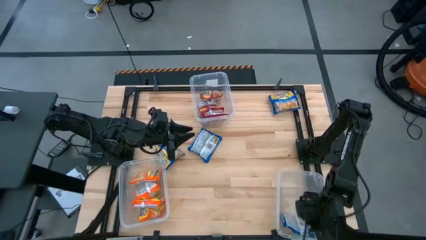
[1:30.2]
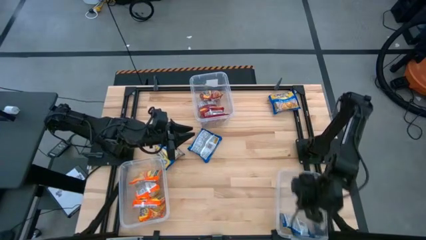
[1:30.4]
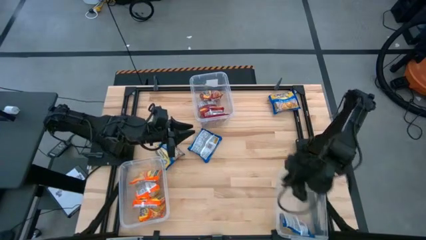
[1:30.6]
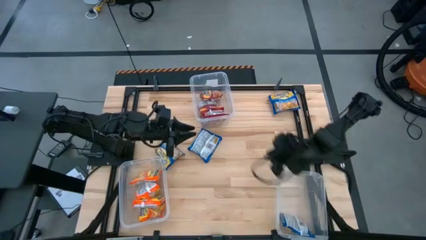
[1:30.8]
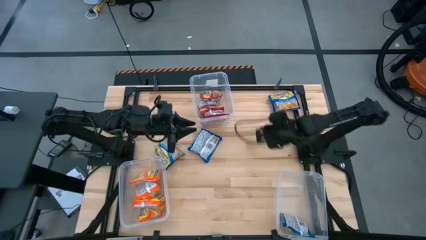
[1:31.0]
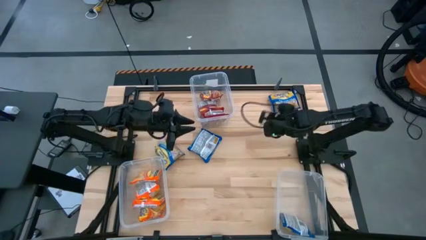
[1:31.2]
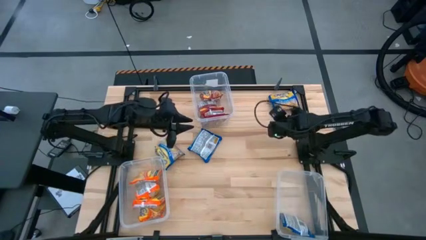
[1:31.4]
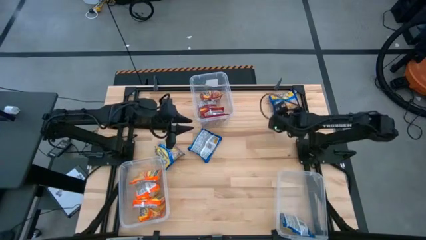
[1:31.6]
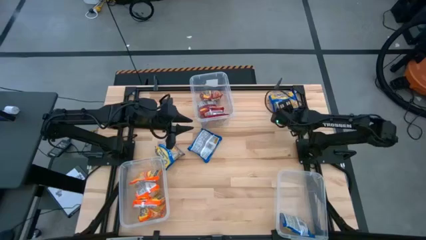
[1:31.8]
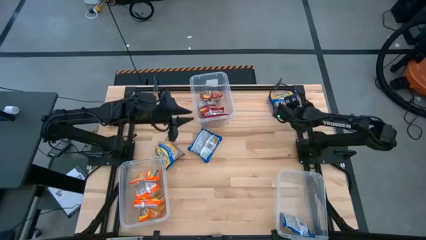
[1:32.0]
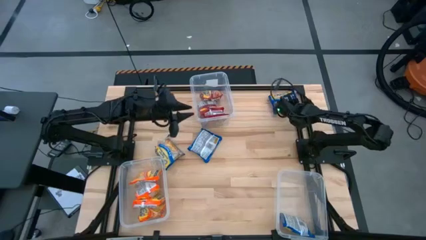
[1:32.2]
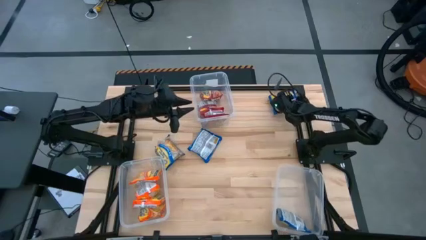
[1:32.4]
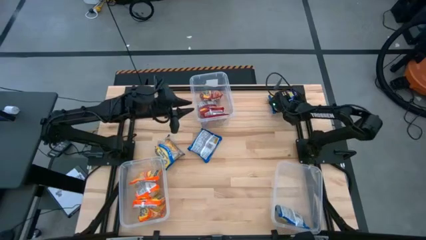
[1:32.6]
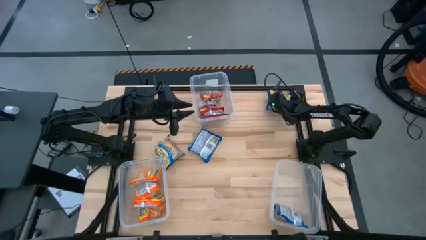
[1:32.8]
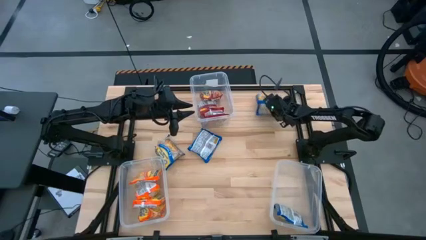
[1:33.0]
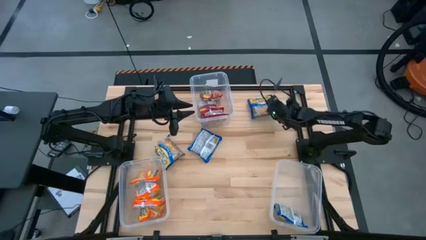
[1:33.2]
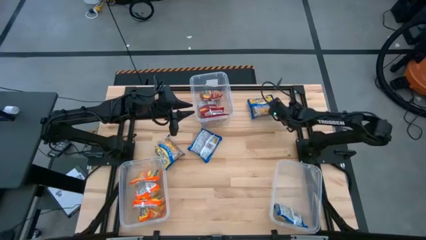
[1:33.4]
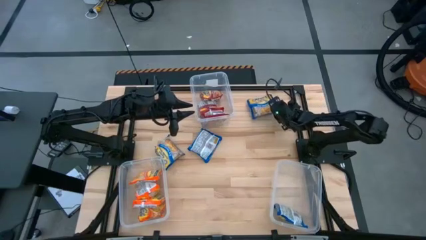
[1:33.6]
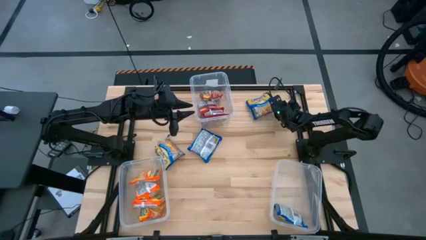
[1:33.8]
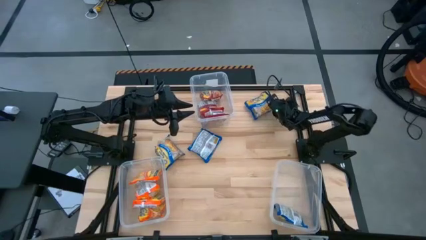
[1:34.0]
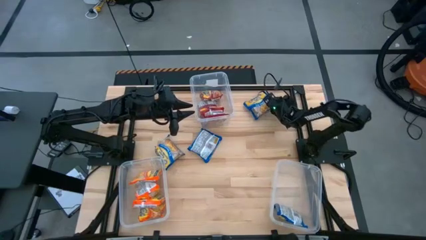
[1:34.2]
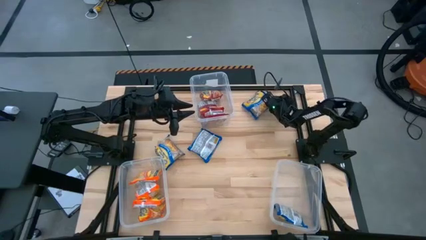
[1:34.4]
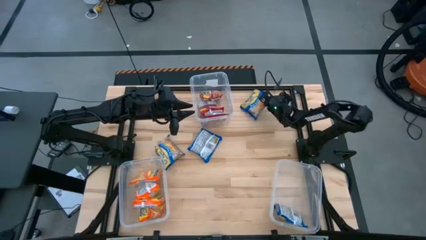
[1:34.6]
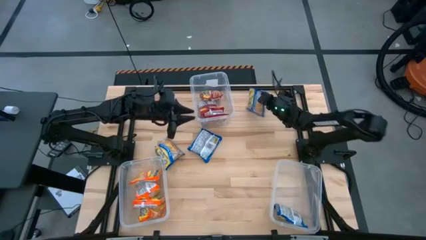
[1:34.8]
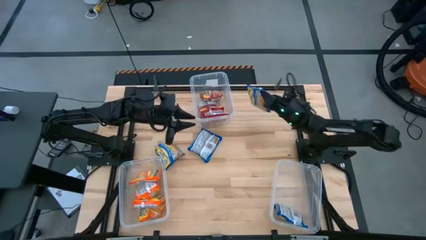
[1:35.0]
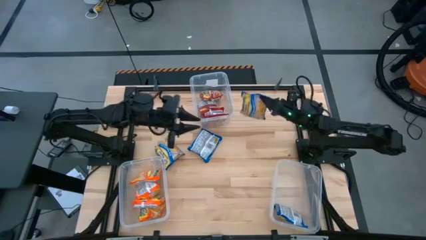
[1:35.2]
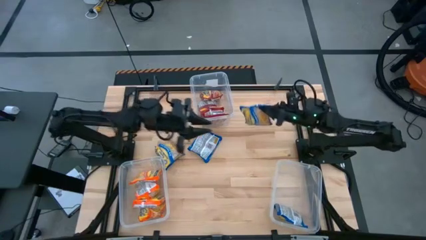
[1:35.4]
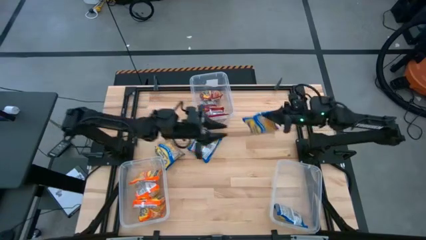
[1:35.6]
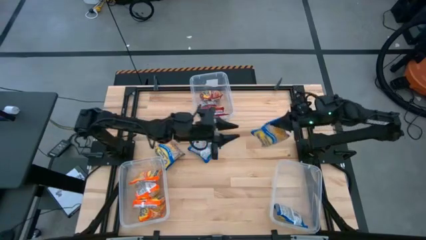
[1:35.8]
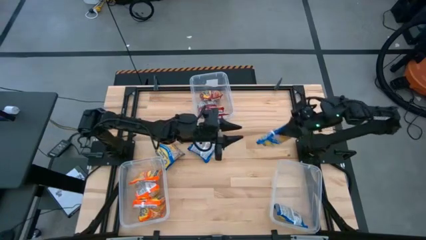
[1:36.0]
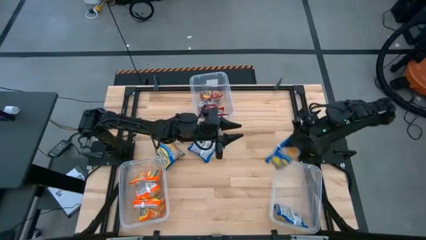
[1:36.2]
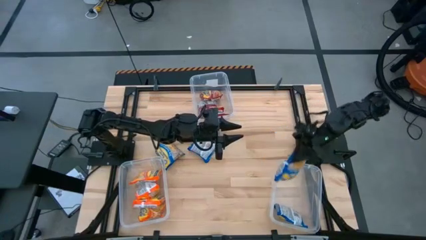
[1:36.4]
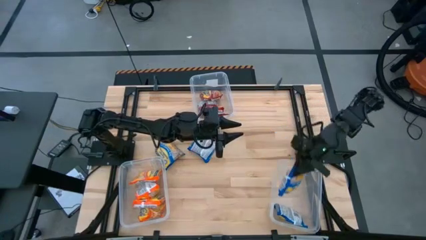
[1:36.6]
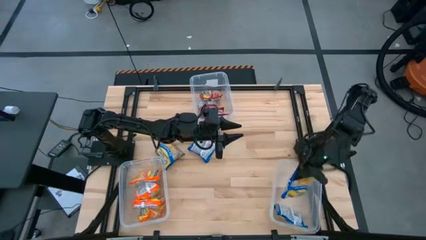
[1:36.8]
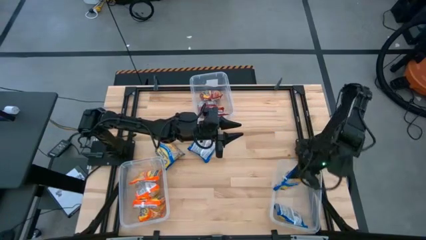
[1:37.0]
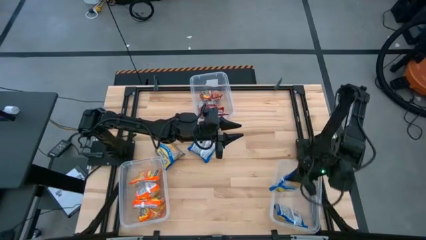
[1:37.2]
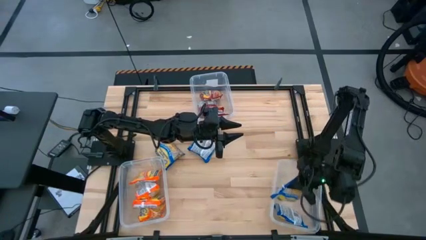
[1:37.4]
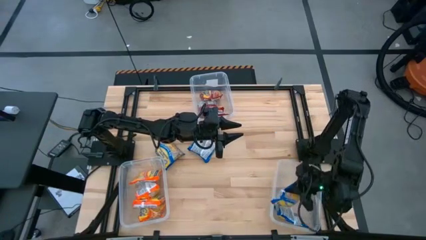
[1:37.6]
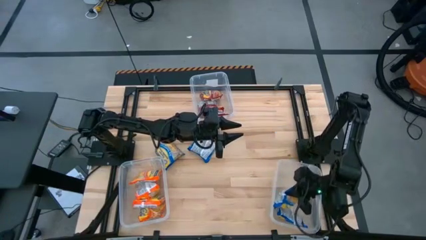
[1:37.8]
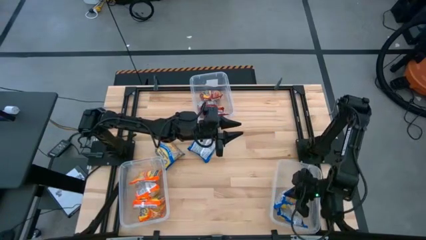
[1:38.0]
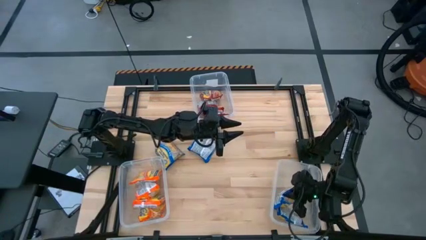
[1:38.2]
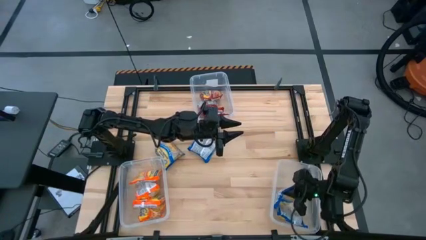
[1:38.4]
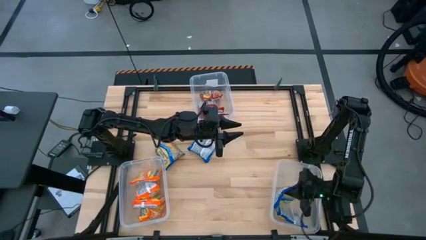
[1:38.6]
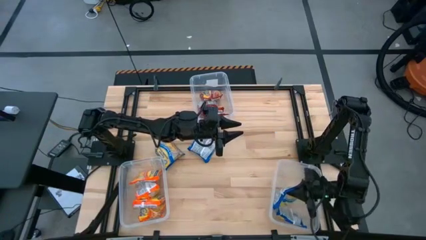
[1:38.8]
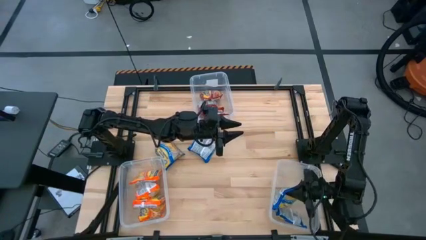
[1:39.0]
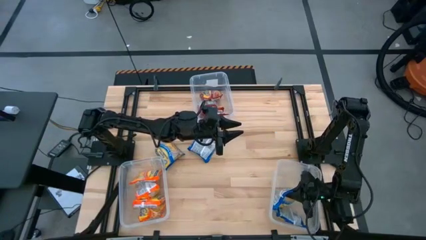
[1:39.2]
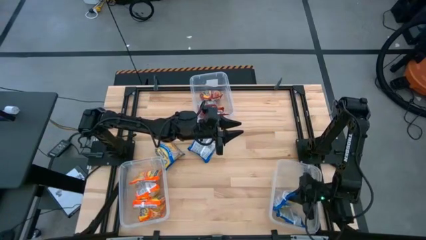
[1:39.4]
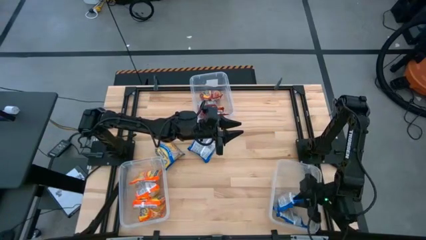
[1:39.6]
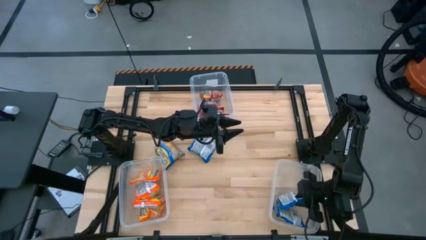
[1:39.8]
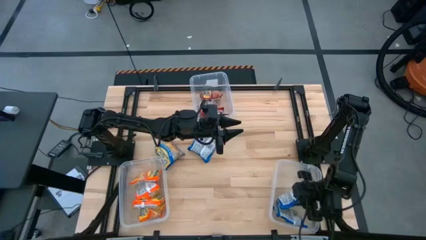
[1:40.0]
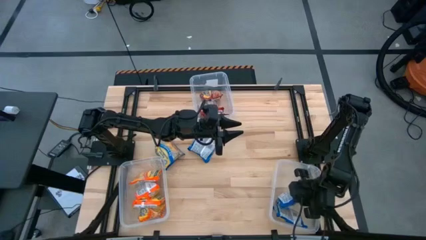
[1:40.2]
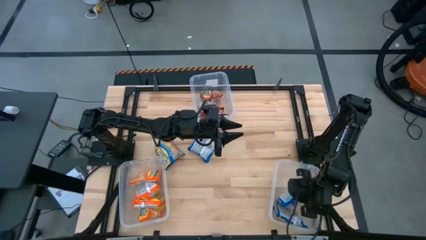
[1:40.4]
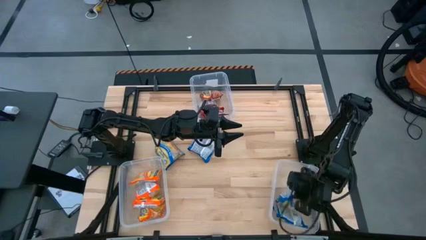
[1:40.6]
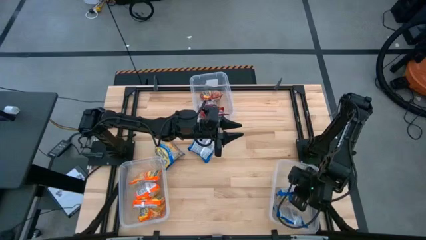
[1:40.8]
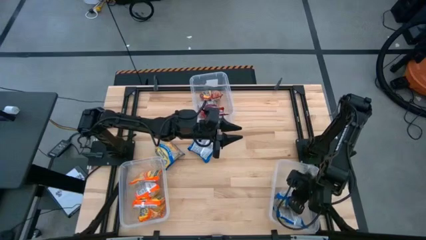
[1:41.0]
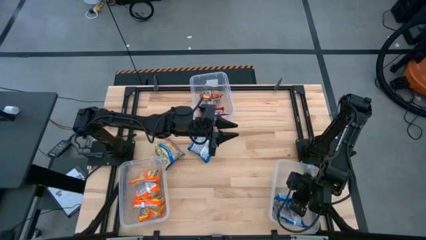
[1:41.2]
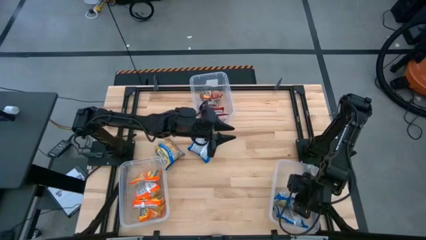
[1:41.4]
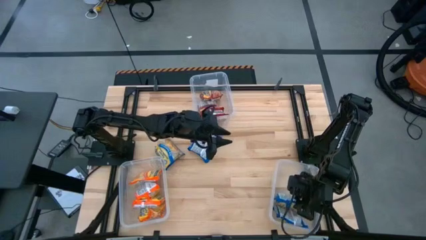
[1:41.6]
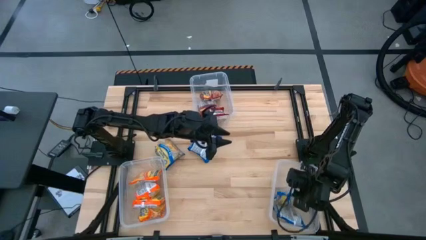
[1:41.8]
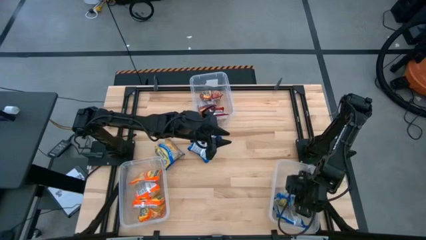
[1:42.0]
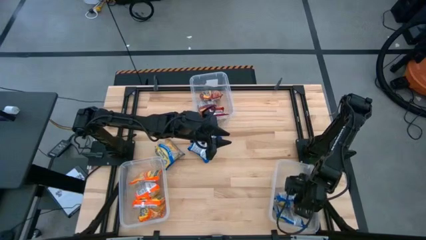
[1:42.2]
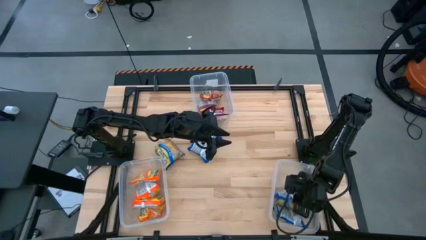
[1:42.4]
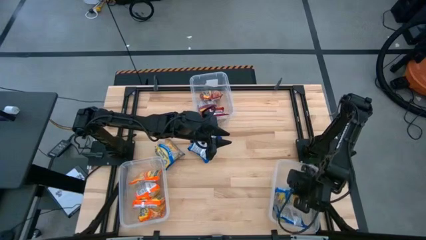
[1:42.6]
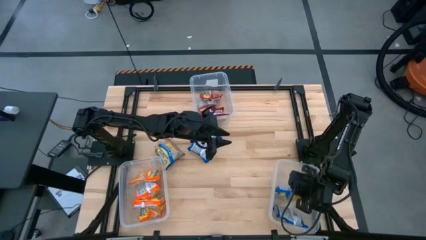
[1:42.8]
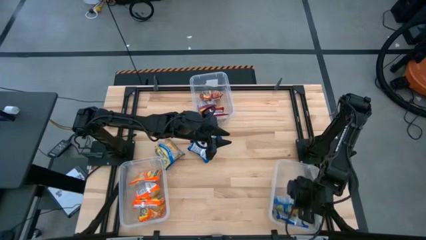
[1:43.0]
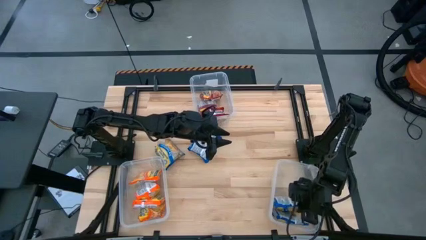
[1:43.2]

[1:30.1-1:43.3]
Task: Sort Maruchan noodles
Put the blue noodle pack into the bottom right transparent bin
